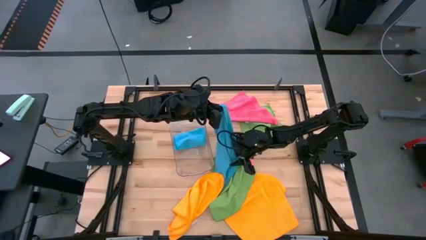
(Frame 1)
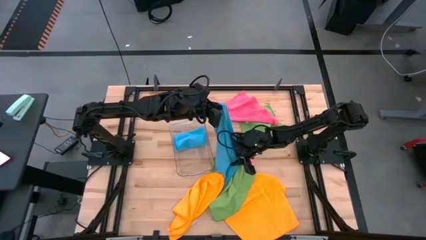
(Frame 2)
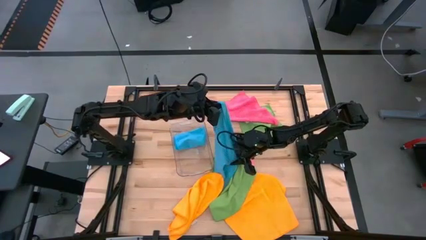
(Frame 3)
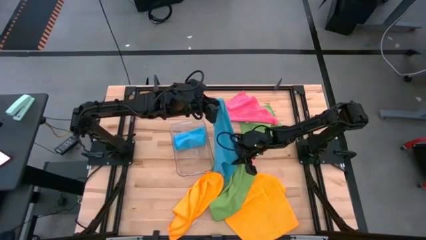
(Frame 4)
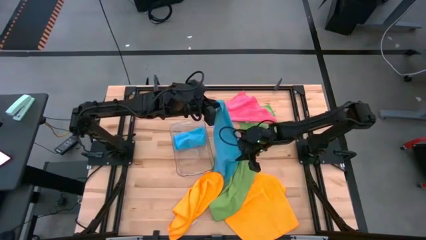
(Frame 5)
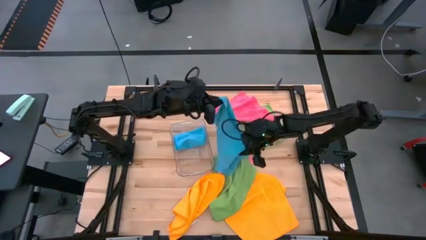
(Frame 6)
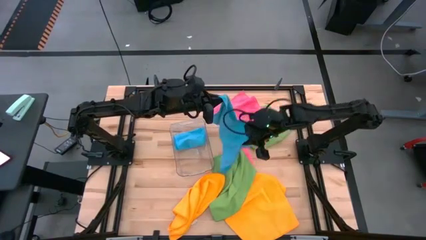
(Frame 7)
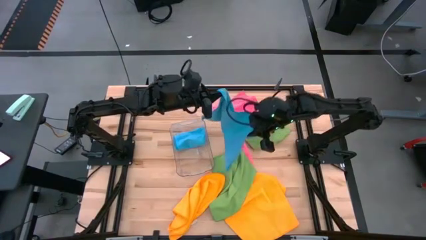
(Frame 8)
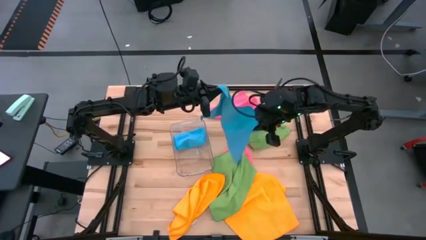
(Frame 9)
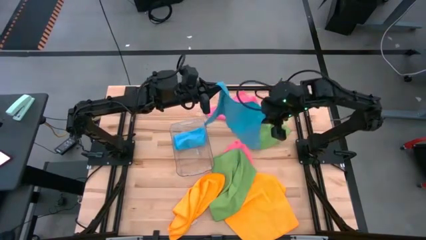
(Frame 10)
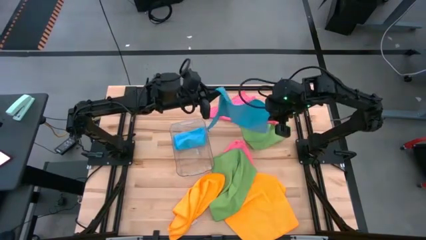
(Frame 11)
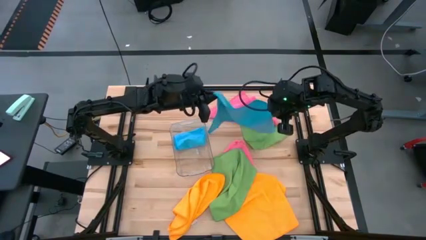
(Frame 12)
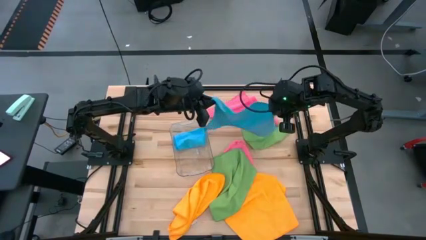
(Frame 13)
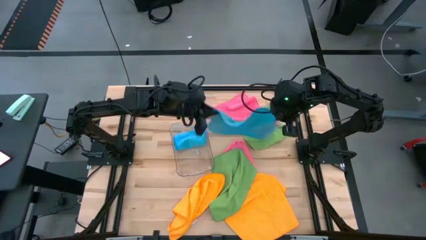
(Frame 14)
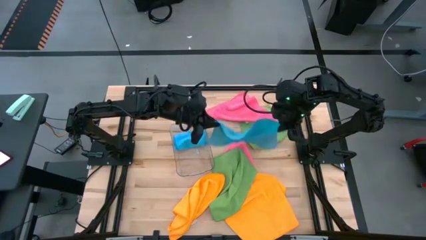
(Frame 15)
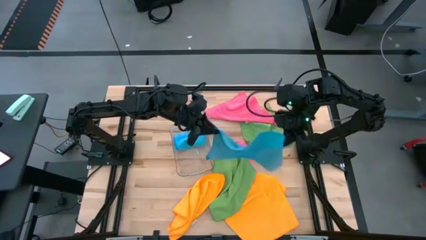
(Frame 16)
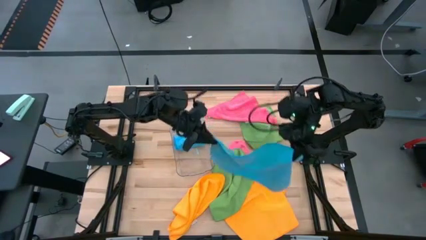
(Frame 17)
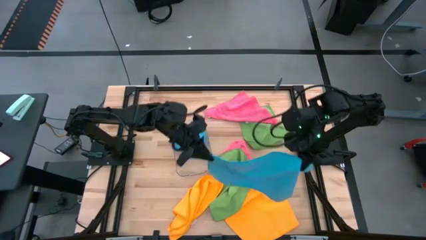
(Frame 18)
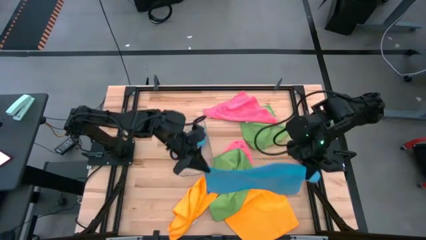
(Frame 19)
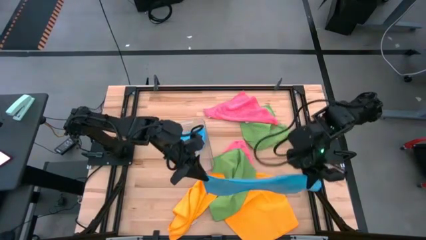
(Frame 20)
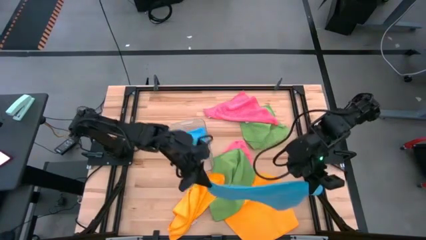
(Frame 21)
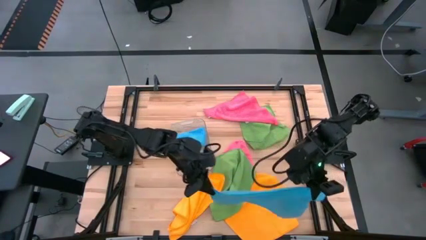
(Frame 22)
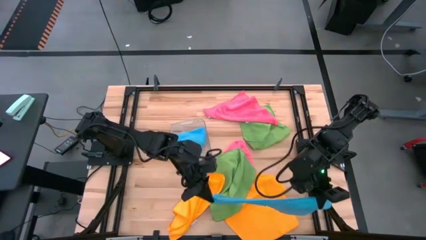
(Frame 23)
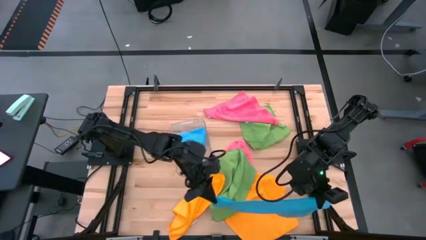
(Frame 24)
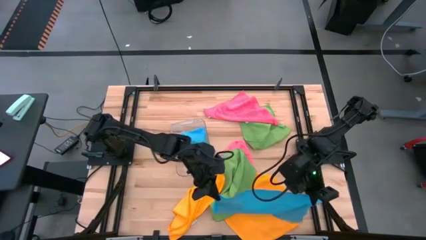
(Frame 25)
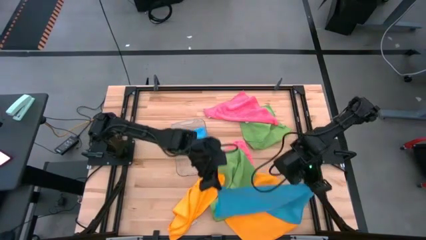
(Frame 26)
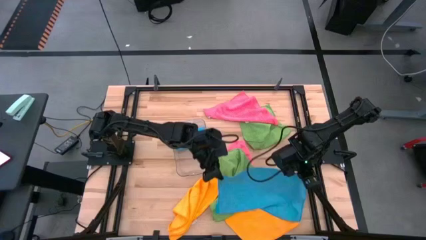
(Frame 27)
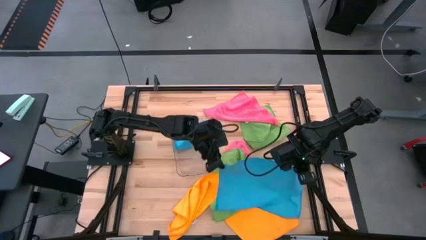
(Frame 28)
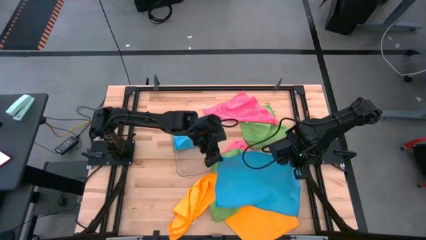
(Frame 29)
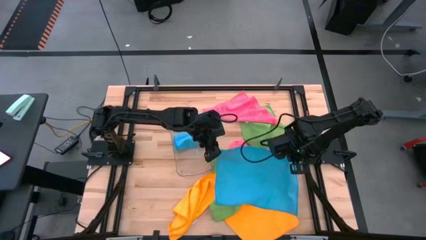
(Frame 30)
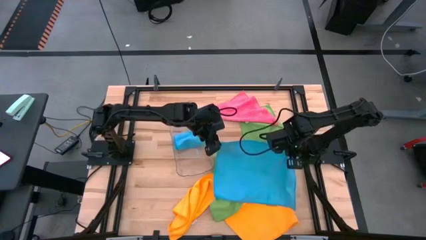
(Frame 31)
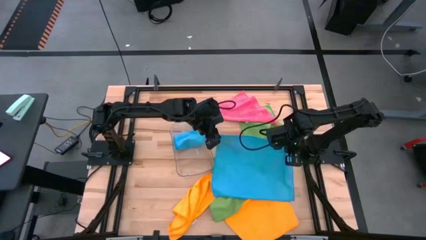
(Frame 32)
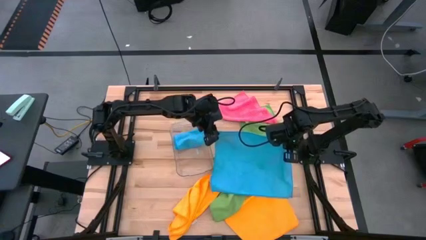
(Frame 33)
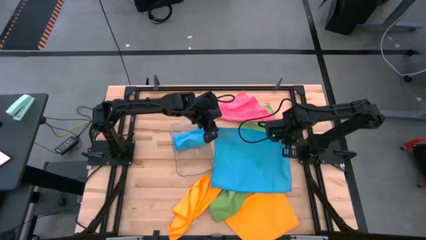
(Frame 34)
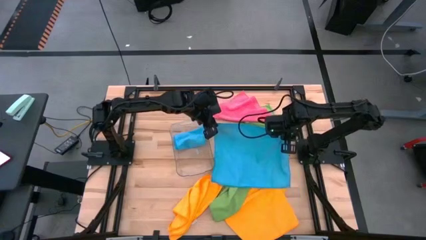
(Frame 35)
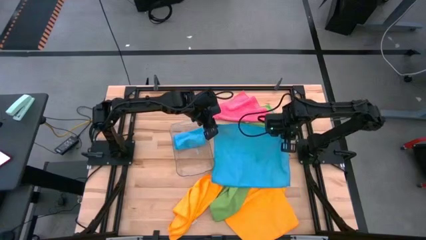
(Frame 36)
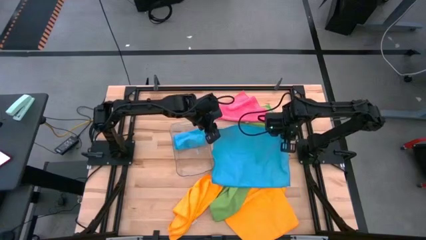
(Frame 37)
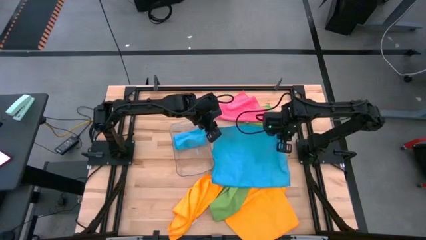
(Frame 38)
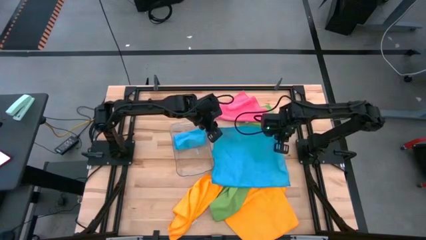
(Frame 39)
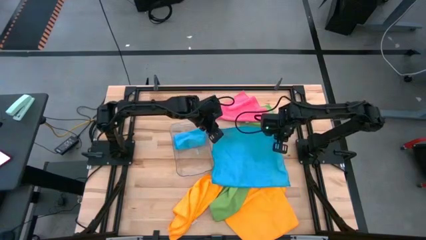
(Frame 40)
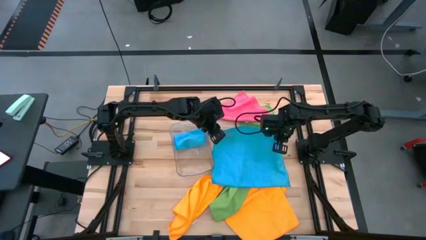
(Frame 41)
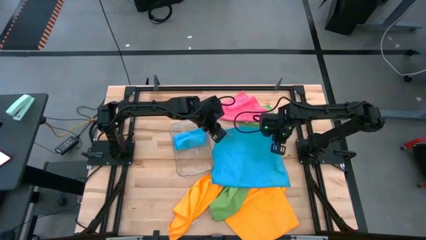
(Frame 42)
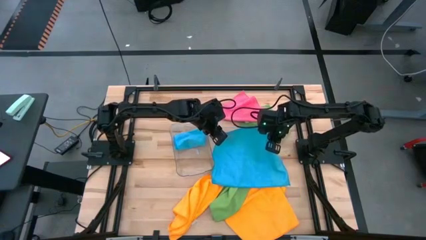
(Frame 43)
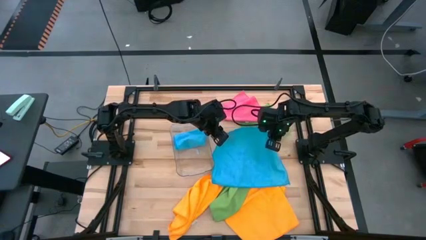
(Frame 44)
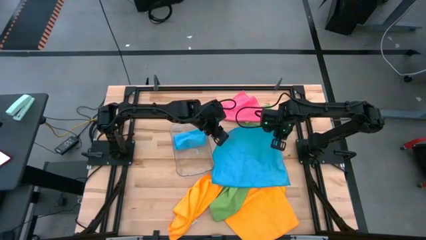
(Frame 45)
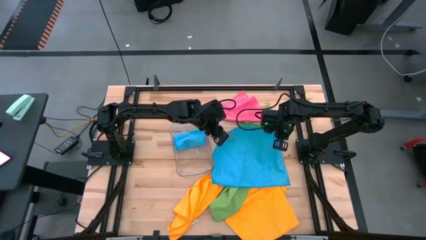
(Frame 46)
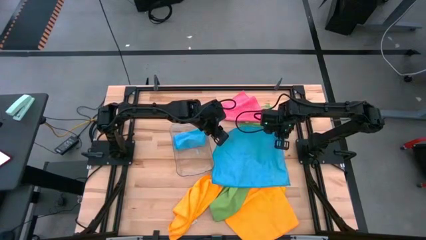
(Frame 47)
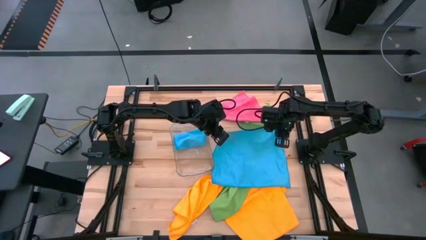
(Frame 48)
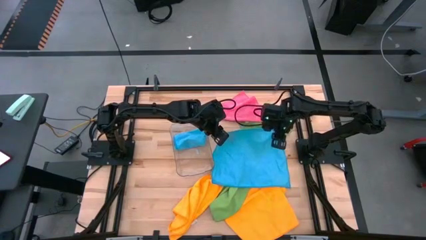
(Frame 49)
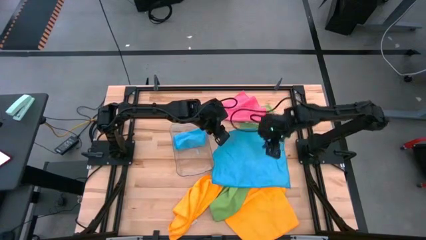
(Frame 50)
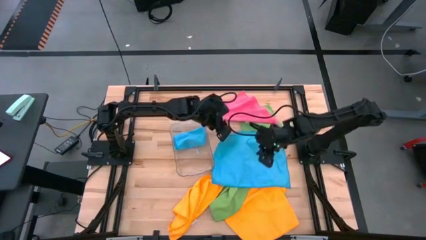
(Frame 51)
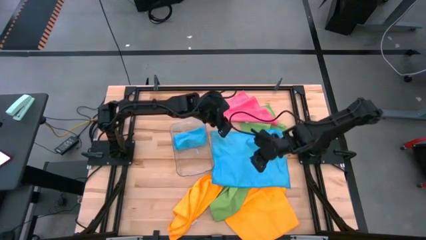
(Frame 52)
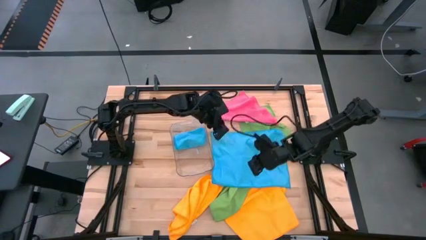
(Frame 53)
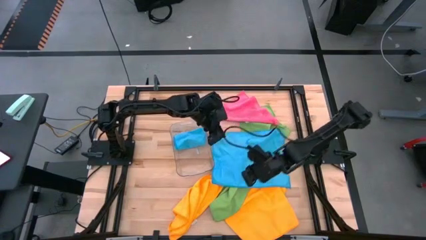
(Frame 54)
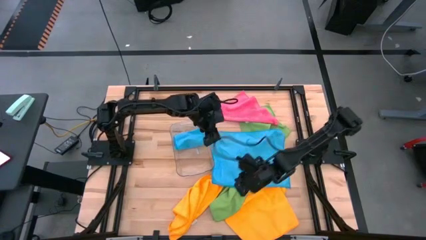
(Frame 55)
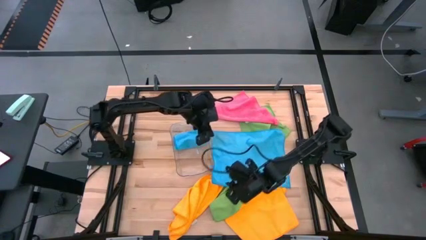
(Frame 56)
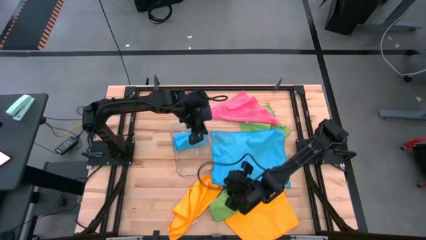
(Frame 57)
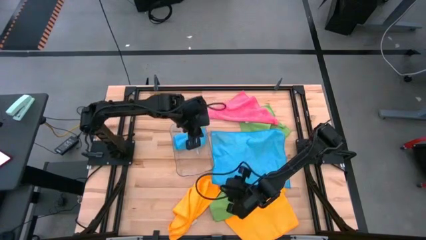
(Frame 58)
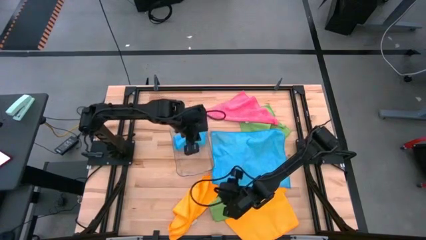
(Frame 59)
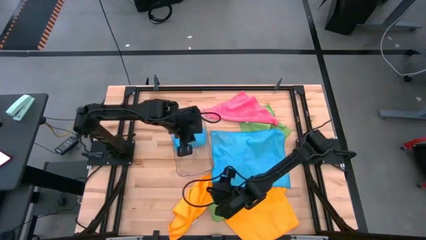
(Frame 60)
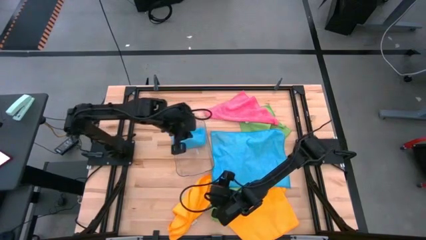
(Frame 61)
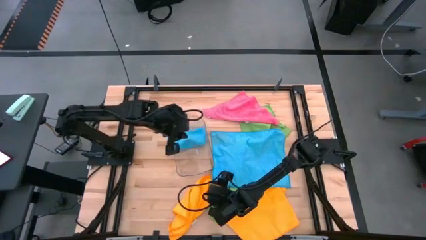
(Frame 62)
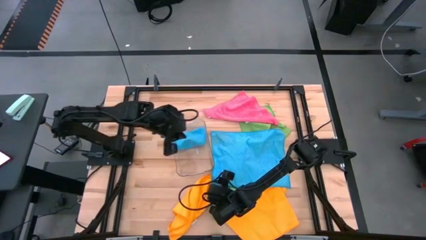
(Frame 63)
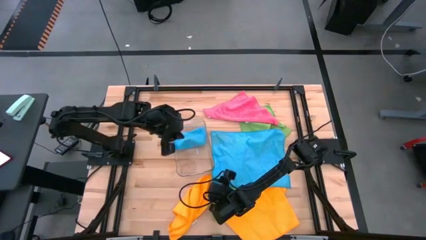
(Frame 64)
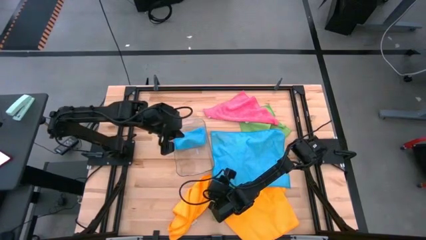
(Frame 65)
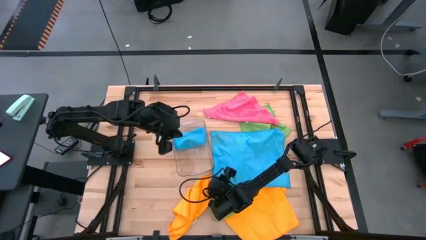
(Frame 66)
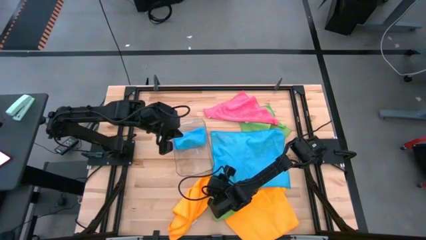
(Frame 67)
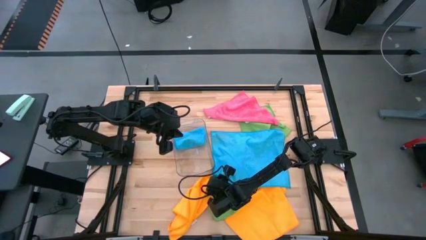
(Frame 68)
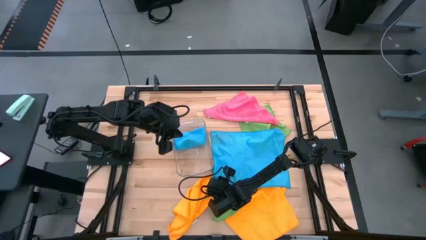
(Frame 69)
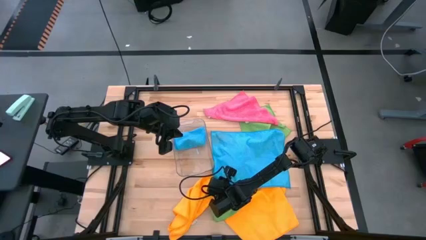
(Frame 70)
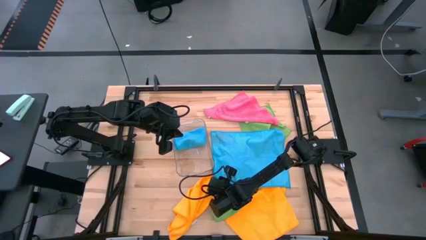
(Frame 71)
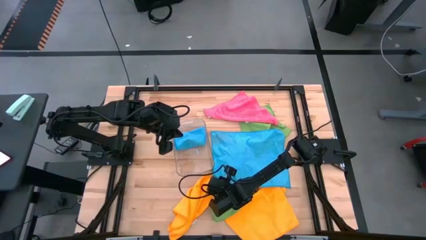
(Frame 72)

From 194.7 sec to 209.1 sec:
Task: Fold microfiber towels
Fold the blue towel
